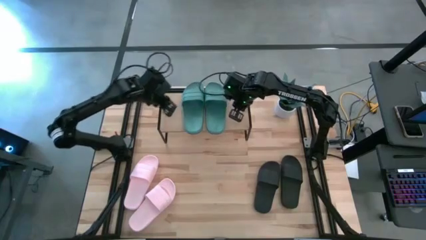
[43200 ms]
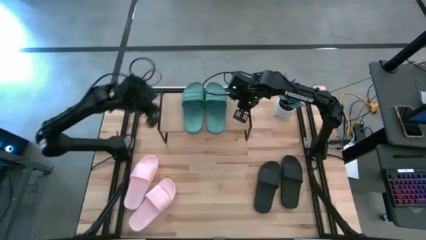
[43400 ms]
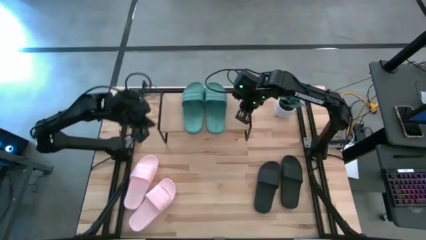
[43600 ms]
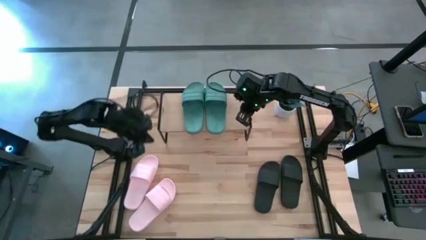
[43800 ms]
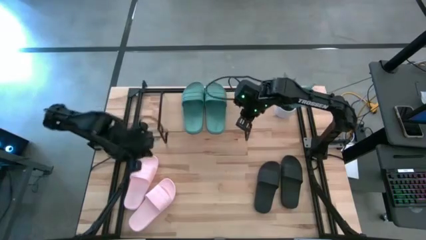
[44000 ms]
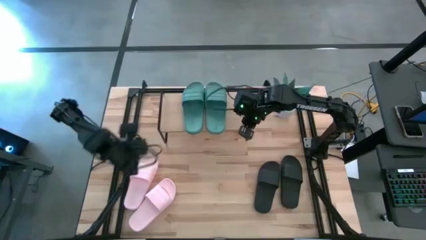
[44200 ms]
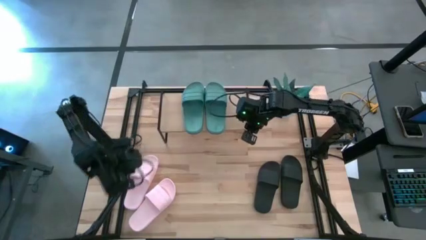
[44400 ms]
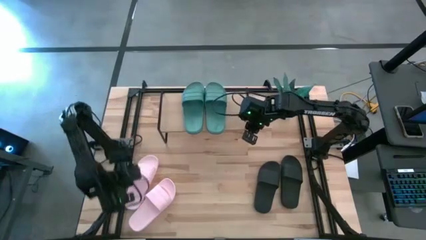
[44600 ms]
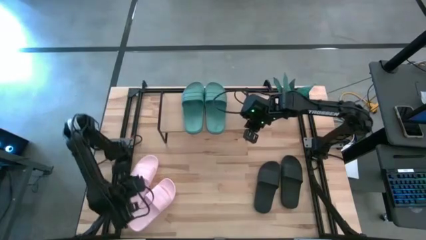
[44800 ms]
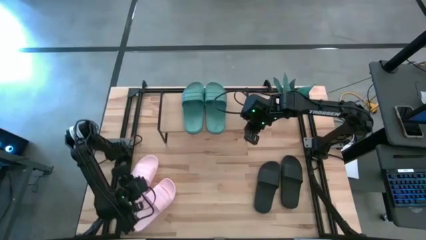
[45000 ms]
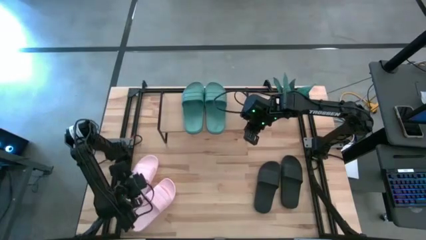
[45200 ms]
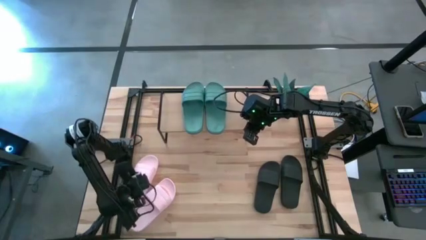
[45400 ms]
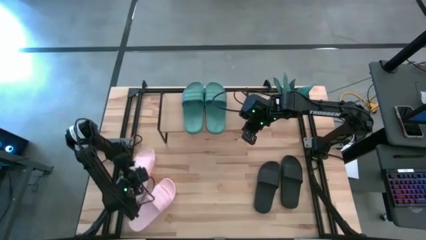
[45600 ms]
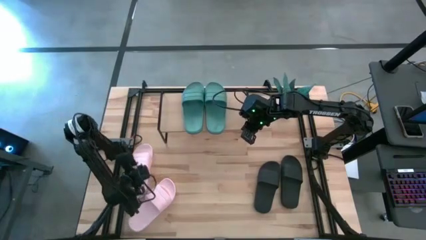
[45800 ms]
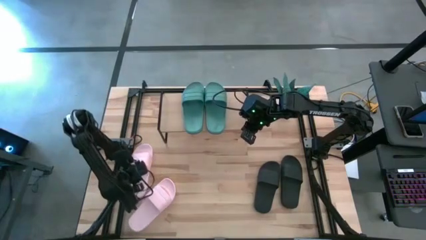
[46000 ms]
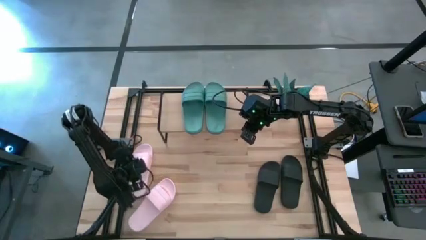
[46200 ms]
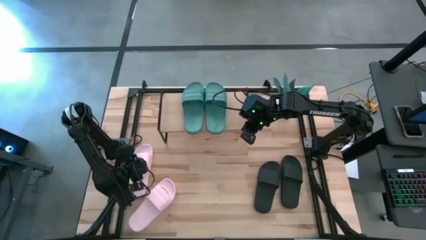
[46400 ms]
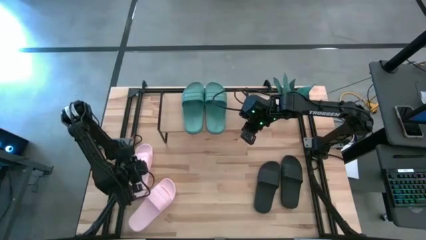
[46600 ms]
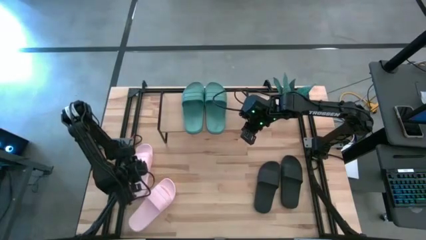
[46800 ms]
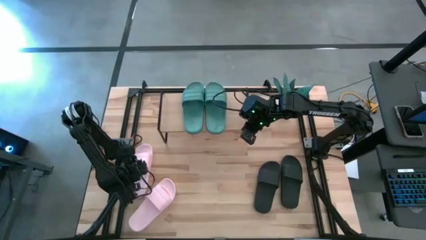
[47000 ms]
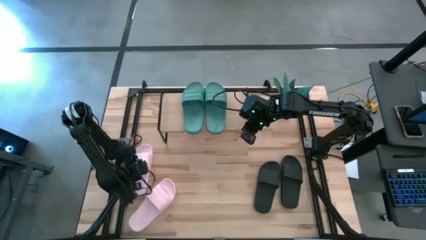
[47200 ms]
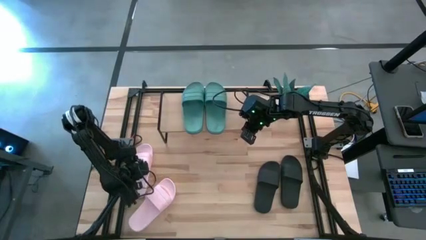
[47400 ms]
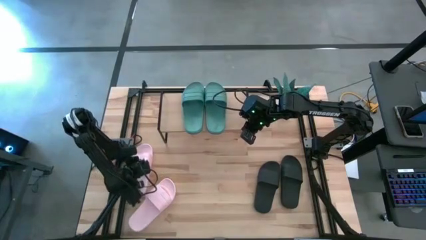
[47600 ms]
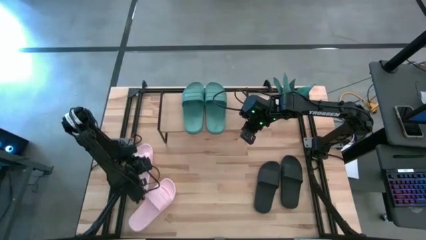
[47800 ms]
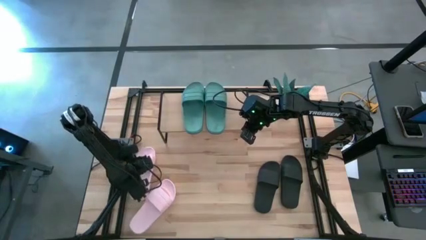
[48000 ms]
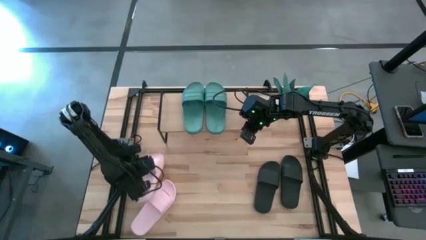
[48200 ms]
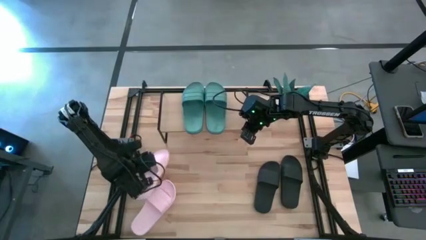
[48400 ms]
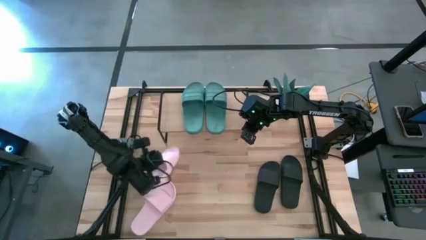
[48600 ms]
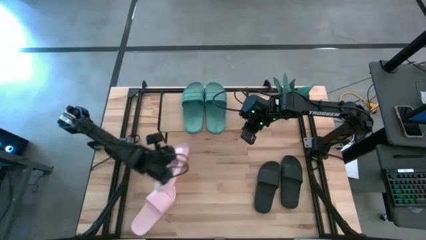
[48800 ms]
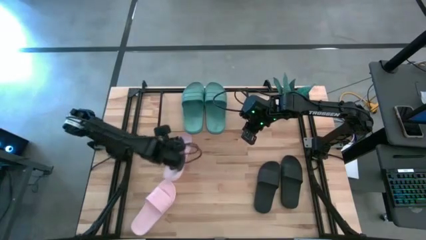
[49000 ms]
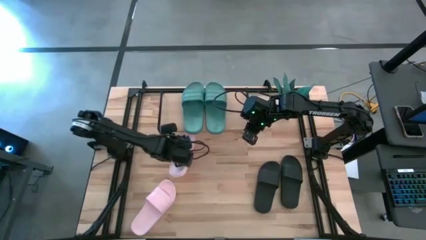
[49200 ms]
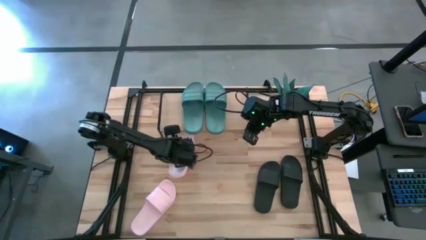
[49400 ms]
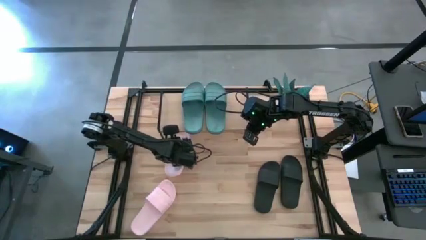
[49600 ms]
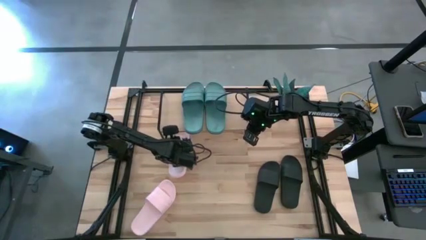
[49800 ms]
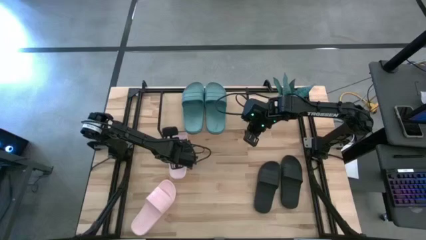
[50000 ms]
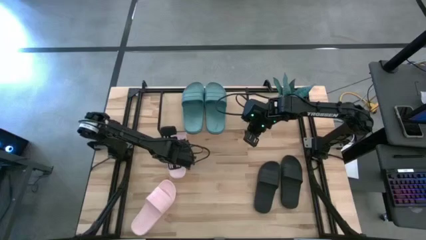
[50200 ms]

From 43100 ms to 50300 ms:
Task: Pick and place slides into the shelf
Put the left pink slide under the shelf

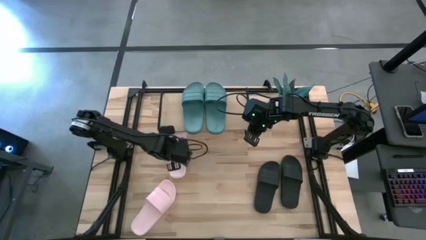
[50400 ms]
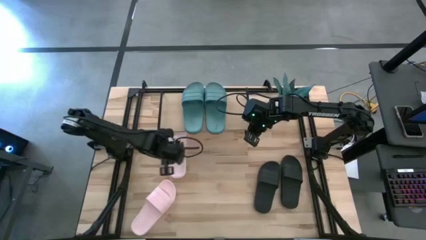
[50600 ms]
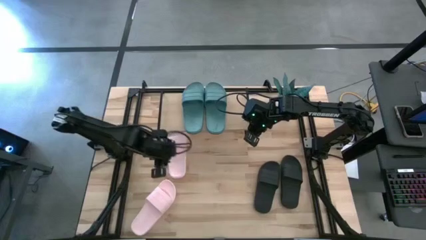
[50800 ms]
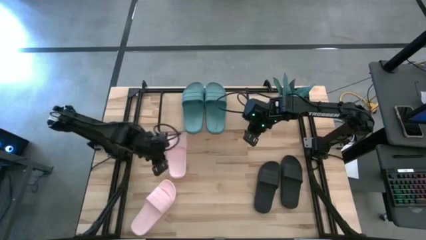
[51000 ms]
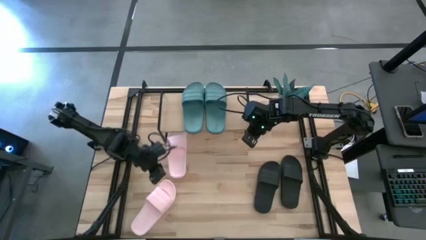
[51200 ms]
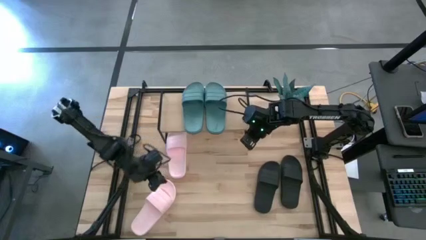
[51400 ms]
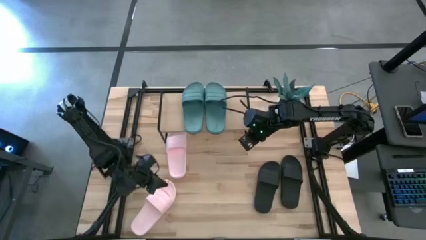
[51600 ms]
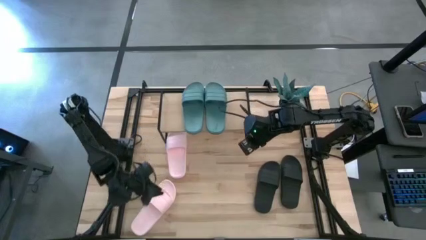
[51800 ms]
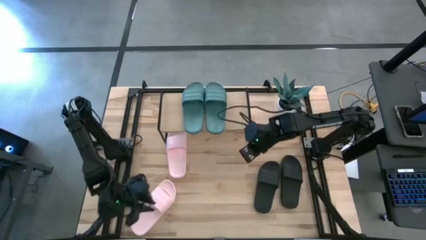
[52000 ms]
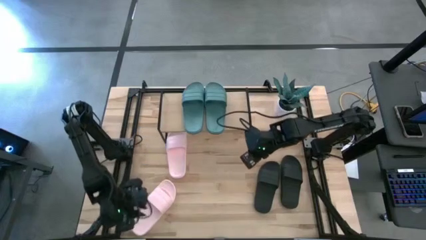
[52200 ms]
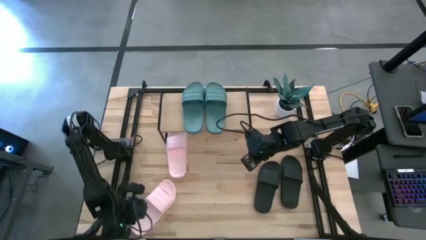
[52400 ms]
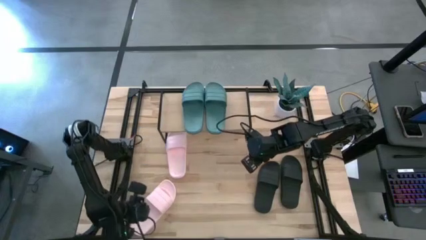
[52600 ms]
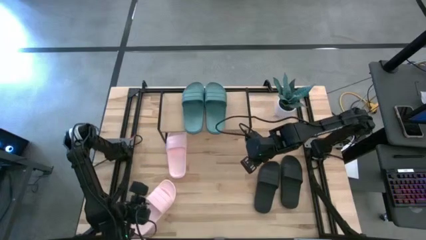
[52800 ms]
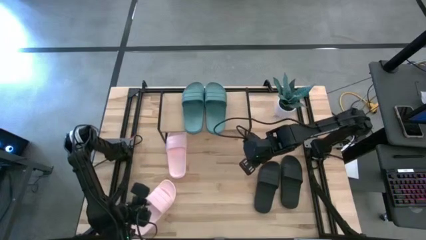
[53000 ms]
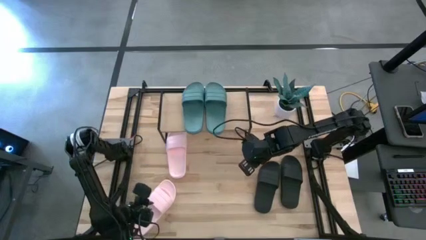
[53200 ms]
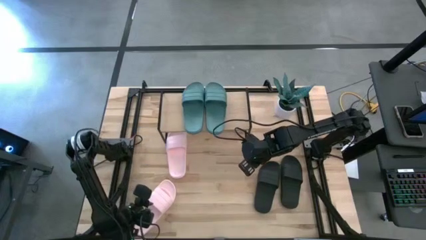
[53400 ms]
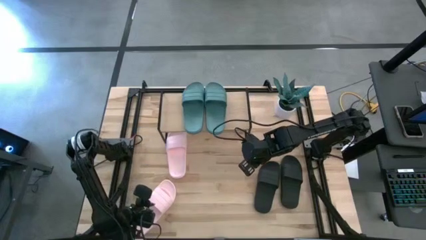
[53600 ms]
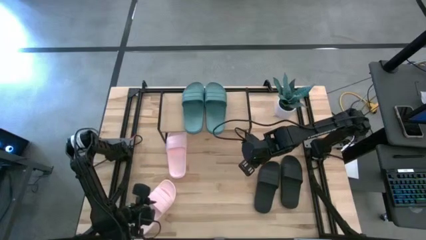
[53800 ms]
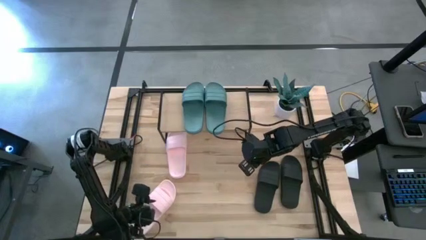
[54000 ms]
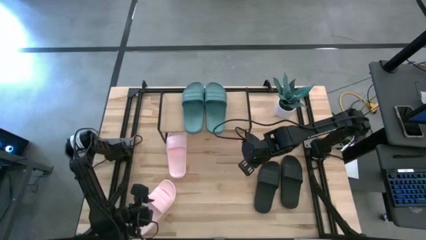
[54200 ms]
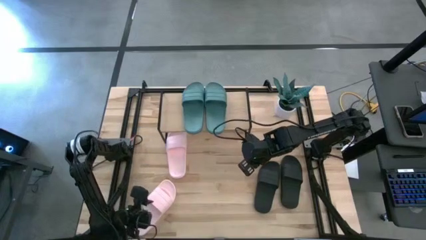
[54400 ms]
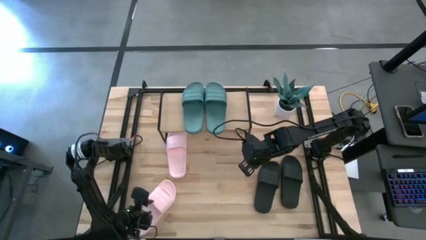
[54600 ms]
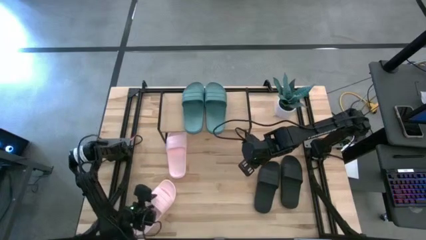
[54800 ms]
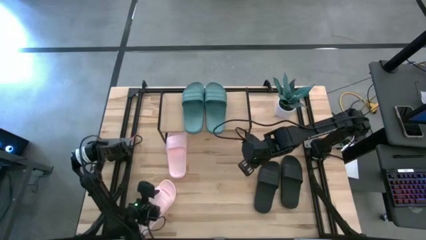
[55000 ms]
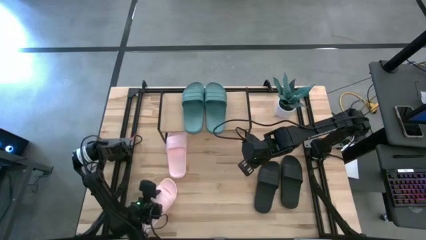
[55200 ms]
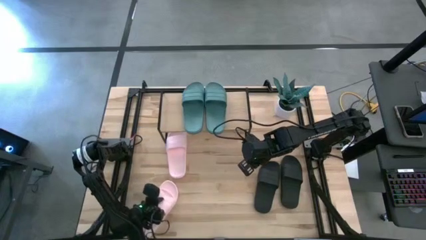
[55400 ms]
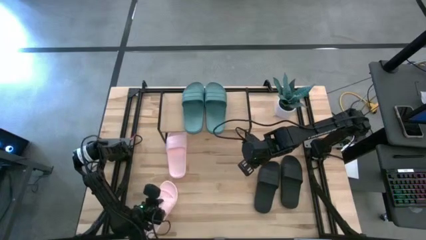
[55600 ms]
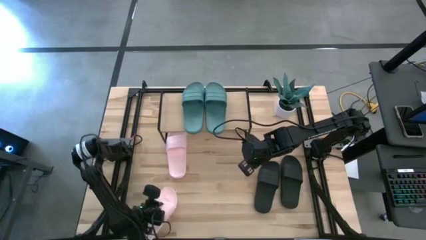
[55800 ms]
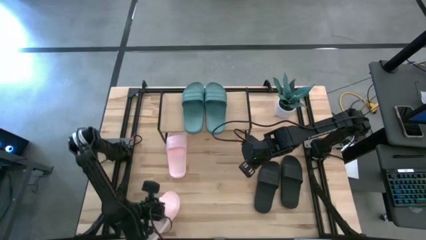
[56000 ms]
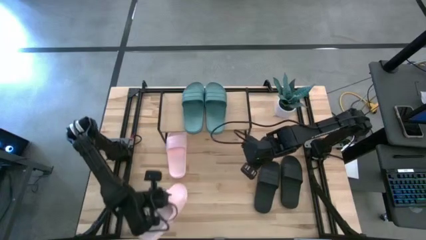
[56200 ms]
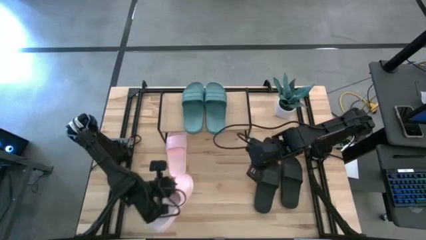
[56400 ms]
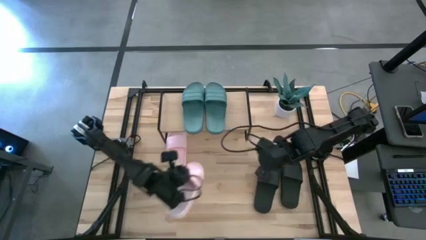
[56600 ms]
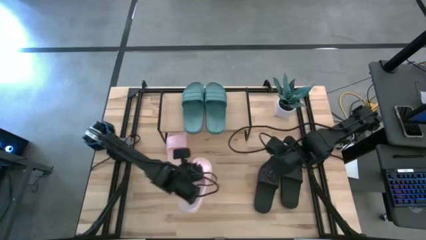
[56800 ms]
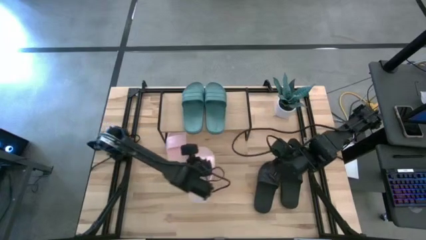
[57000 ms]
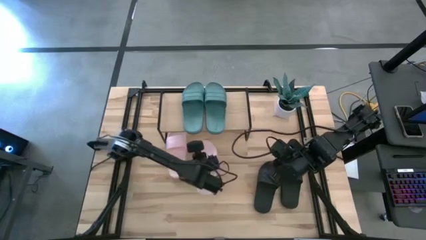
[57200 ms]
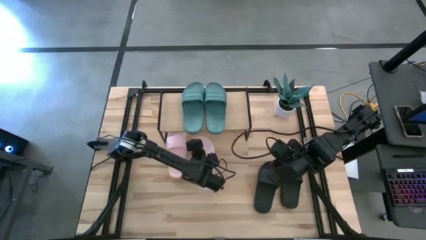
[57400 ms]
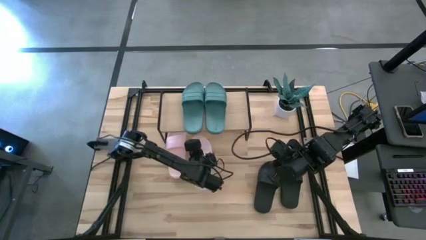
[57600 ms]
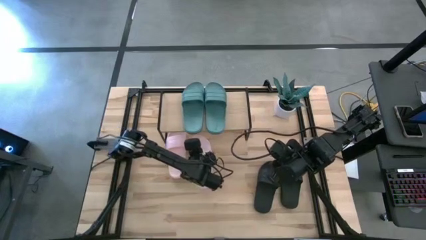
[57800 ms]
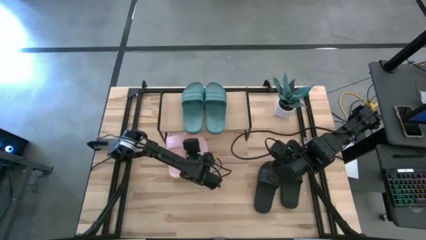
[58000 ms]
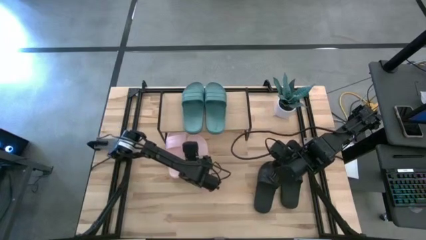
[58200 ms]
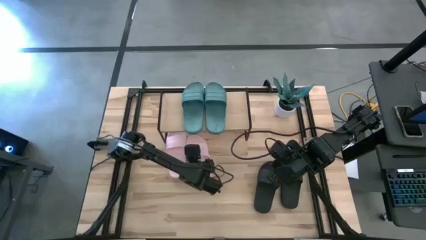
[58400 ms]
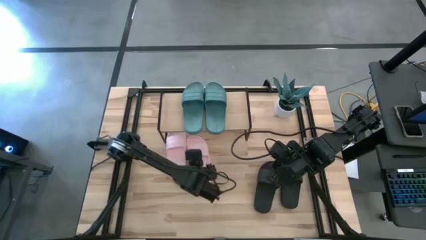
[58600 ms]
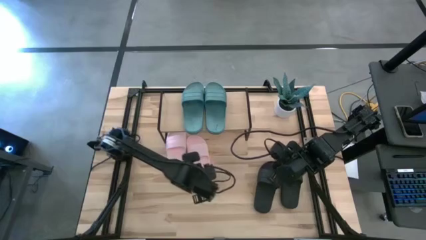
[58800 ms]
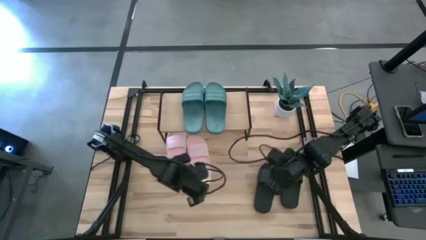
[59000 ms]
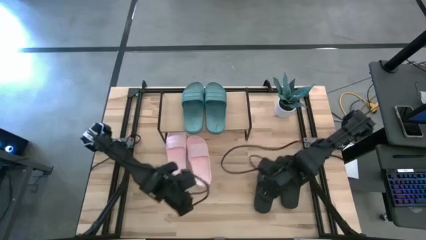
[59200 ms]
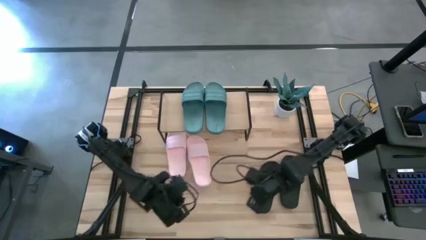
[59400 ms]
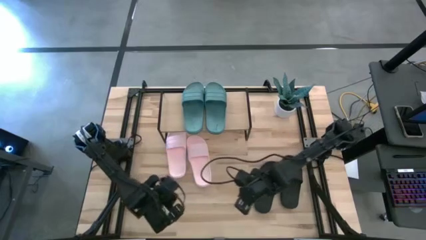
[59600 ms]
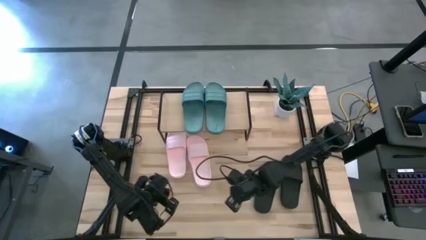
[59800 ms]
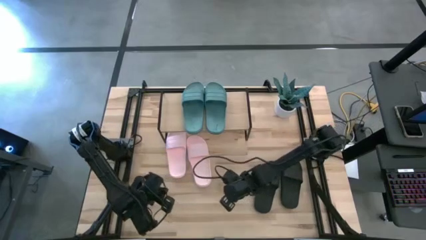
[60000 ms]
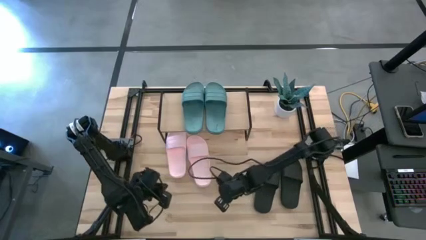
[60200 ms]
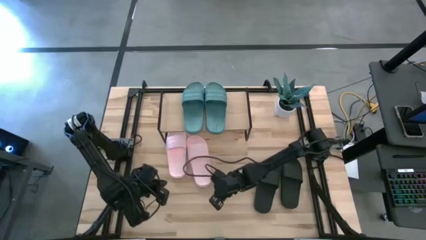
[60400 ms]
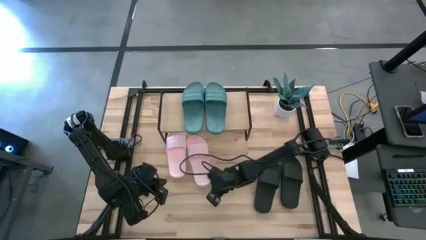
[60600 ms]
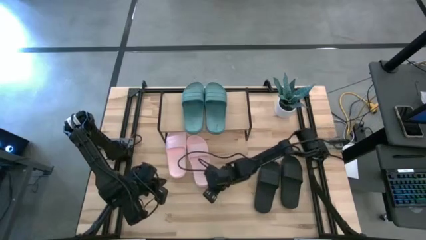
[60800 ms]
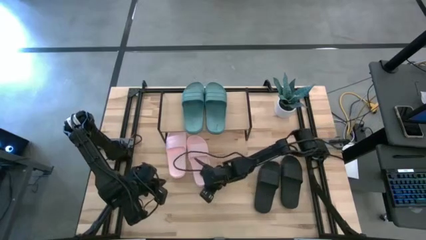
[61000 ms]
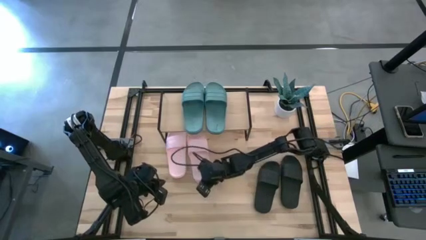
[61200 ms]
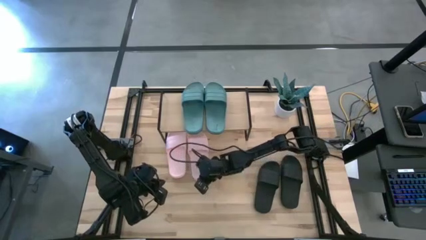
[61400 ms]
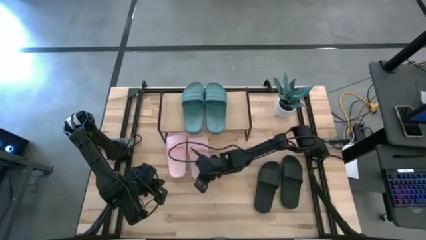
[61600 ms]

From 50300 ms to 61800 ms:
Put the pink slide under the shelf
